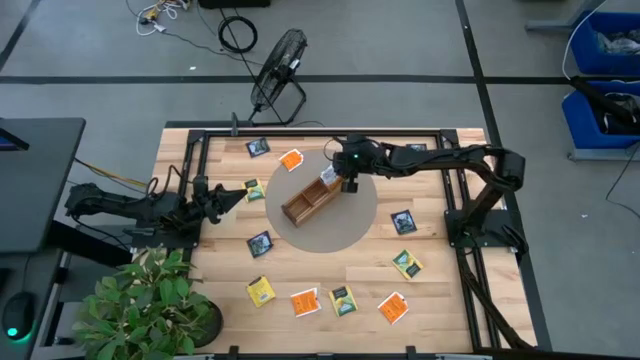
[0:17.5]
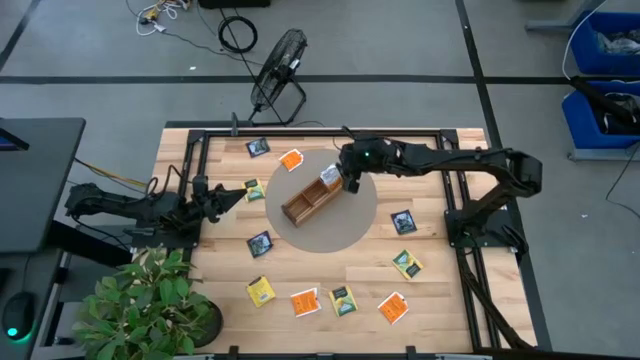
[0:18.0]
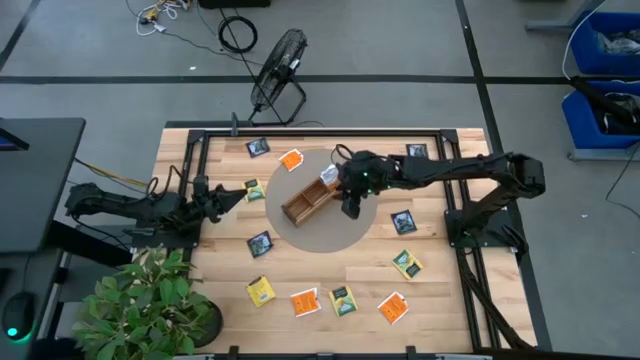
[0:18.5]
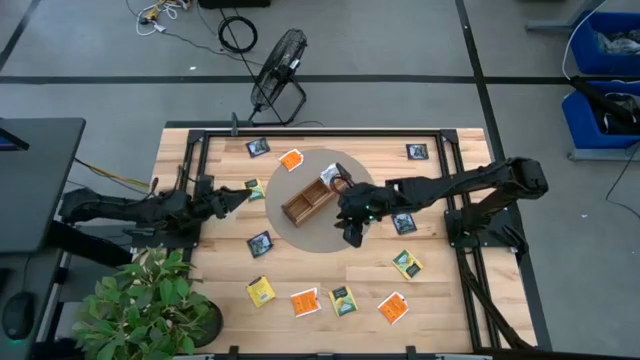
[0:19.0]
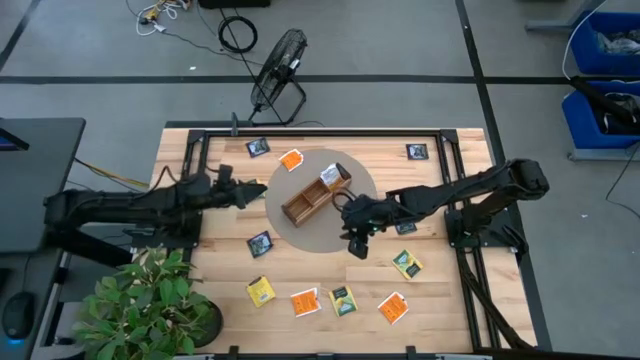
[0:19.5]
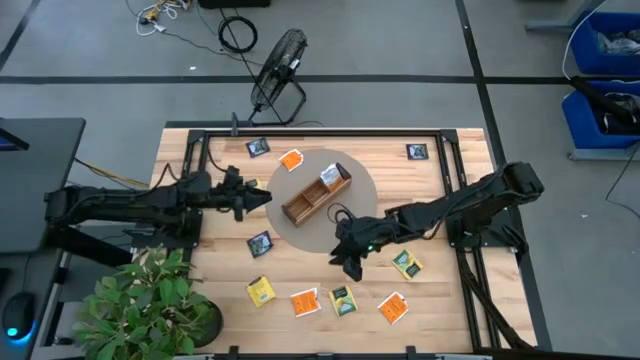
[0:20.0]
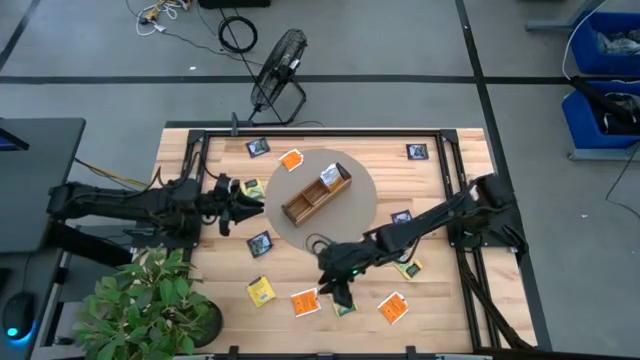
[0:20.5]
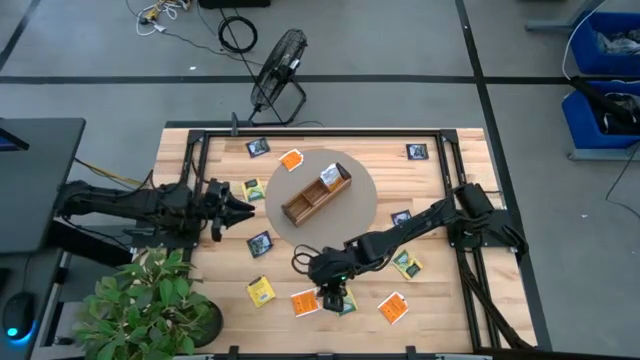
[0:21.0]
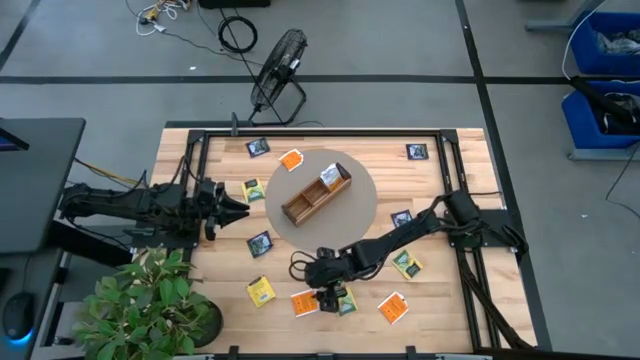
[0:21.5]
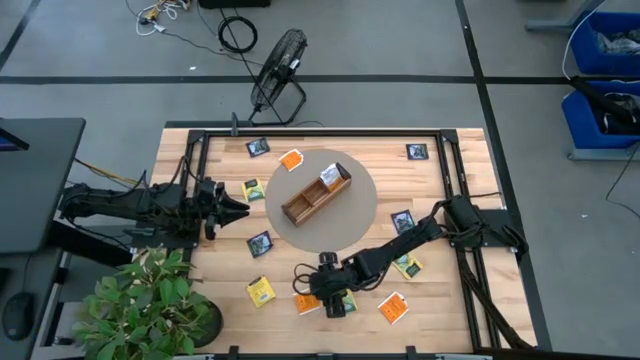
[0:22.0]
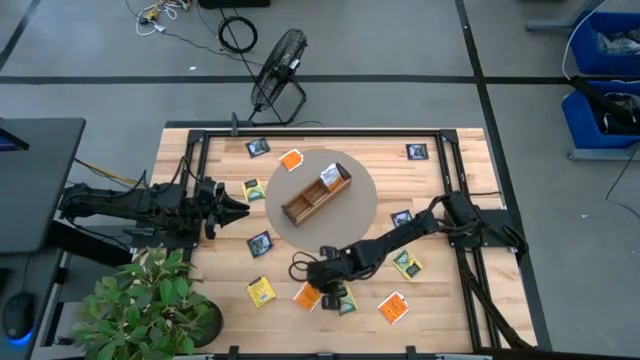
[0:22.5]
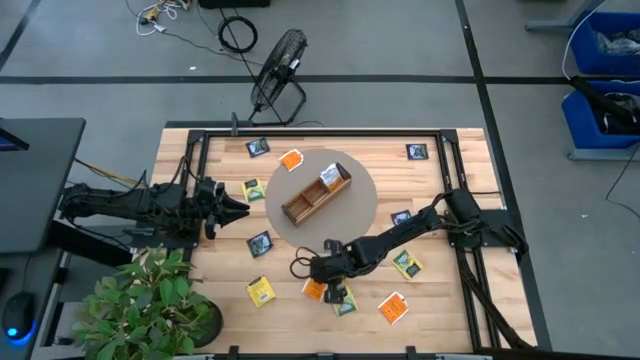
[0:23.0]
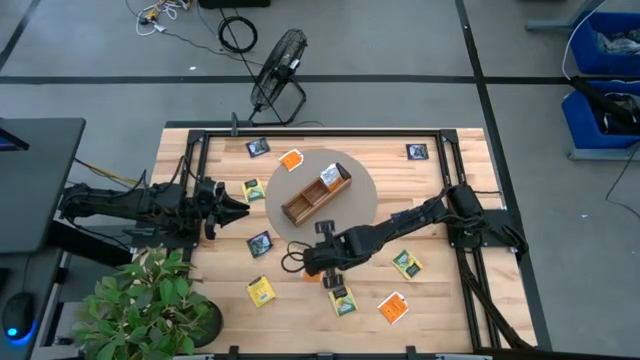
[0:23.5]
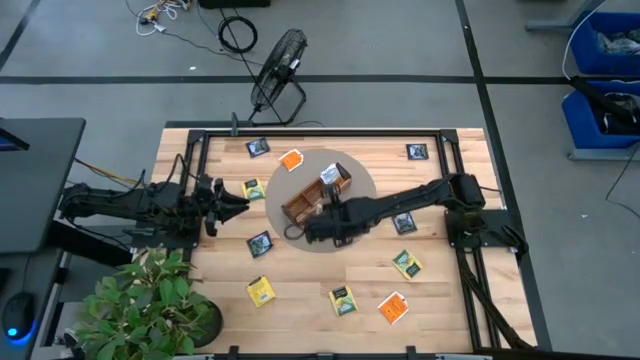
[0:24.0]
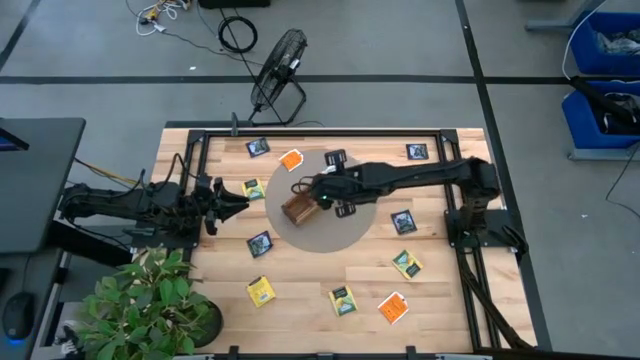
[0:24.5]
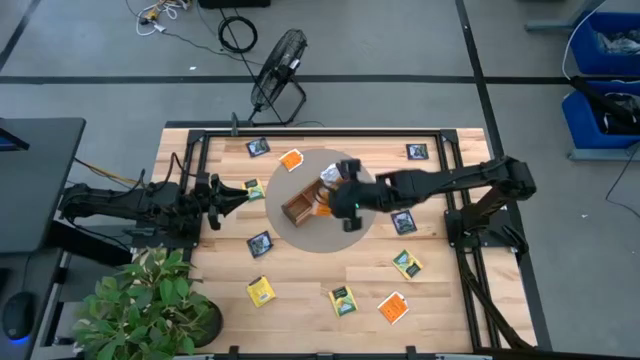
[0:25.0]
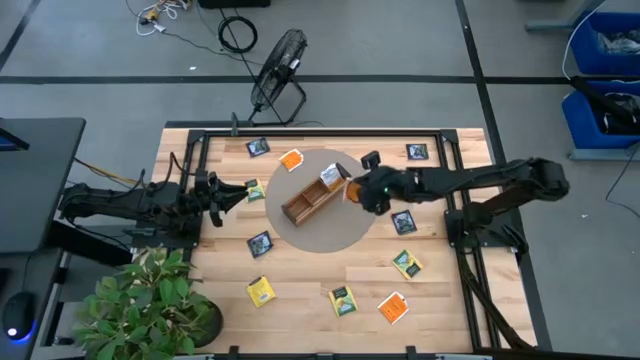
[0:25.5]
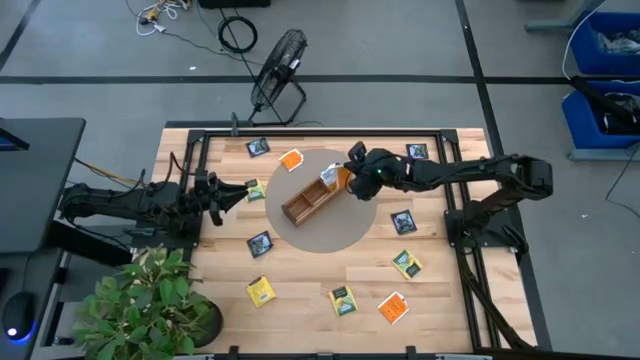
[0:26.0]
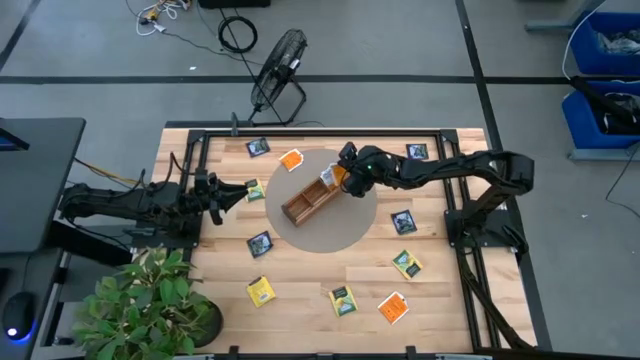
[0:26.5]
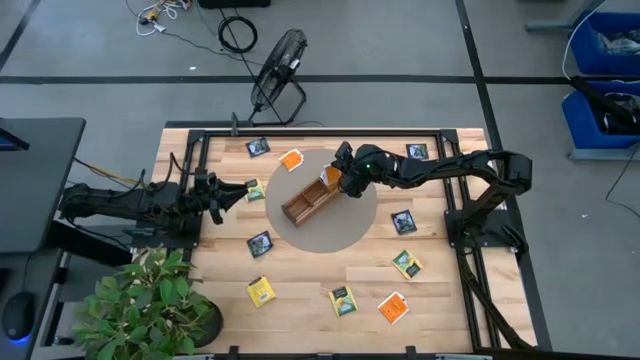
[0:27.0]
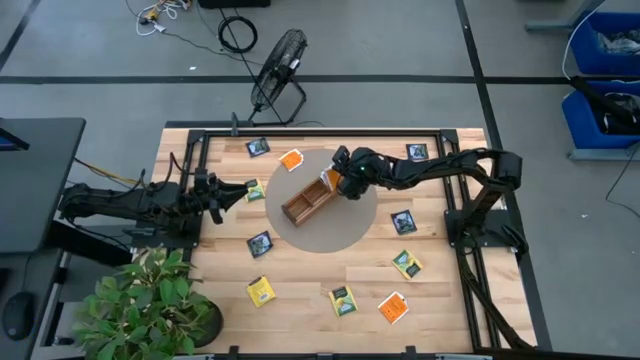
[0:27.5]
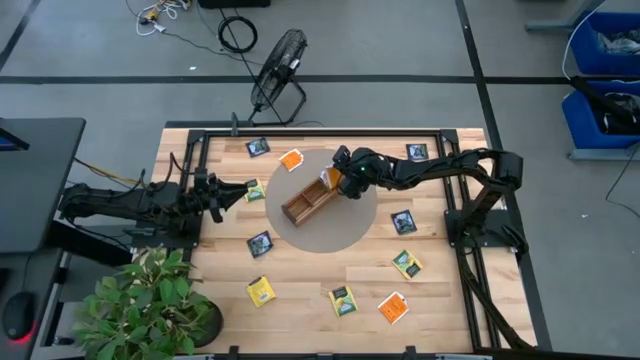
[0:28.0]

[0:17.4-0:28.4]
Task: Pick & Place Tea
Put the orange tea bag into the right section of the wooden organizer

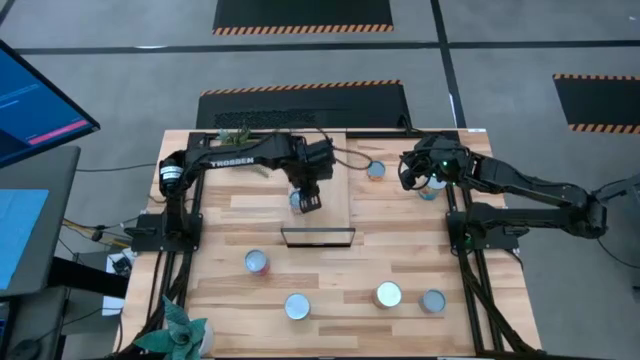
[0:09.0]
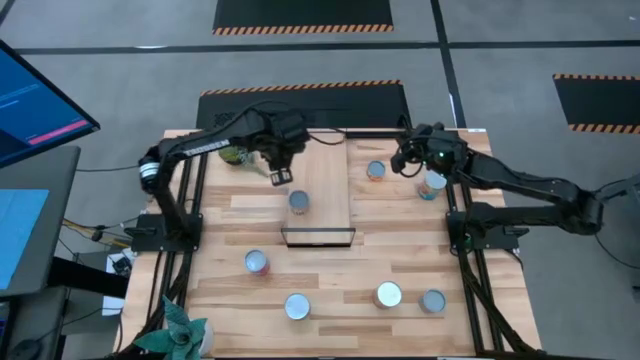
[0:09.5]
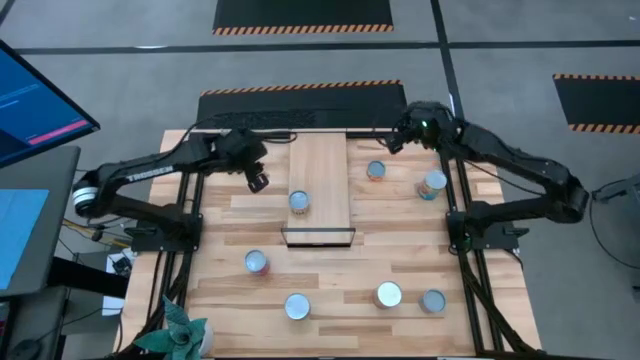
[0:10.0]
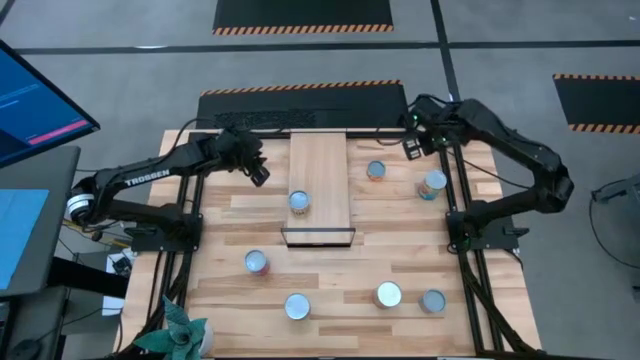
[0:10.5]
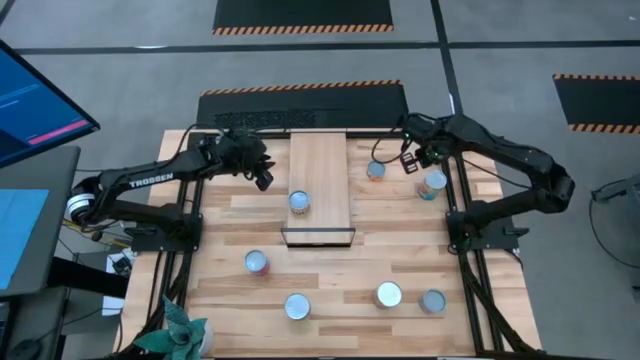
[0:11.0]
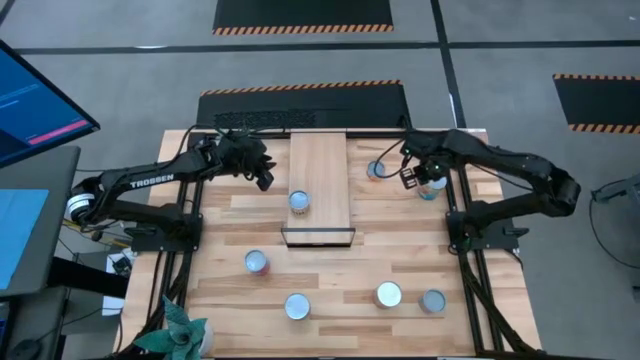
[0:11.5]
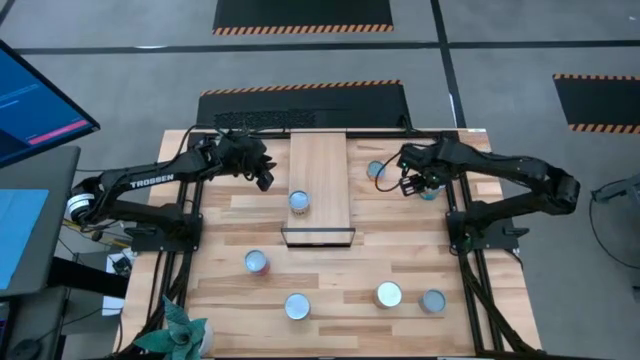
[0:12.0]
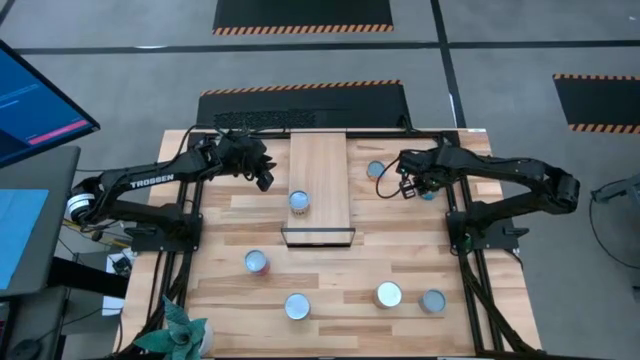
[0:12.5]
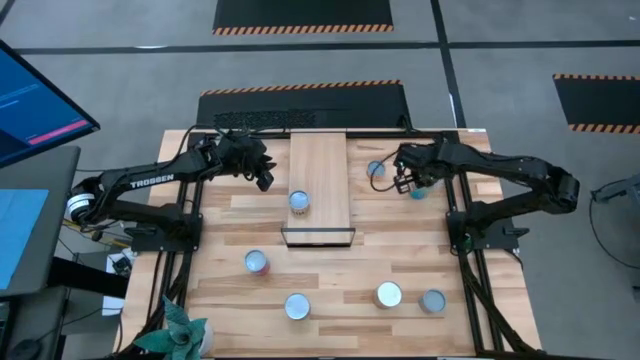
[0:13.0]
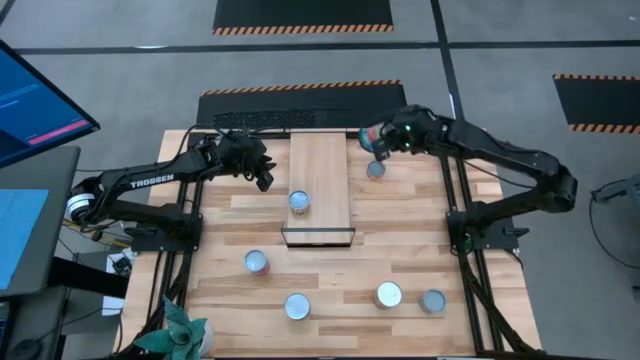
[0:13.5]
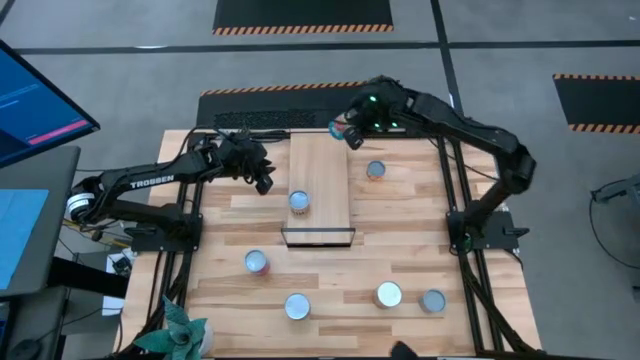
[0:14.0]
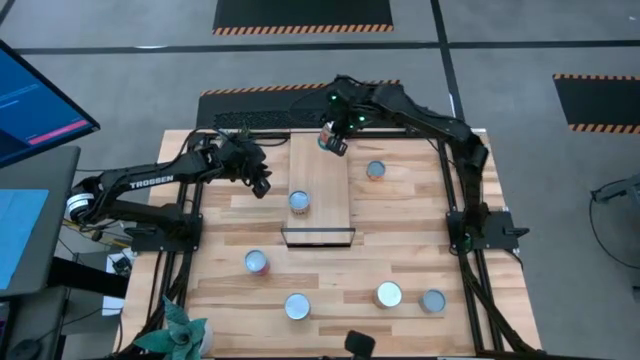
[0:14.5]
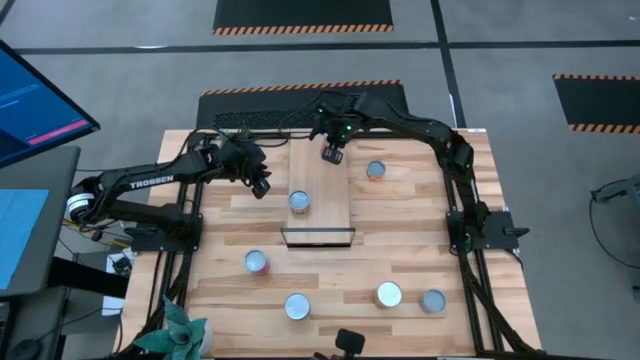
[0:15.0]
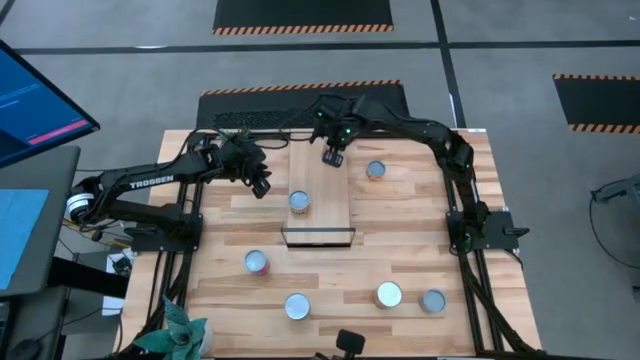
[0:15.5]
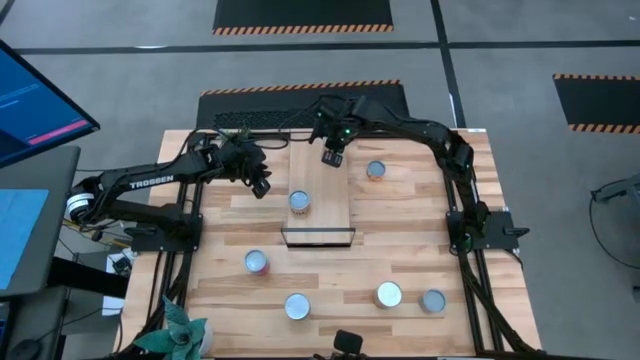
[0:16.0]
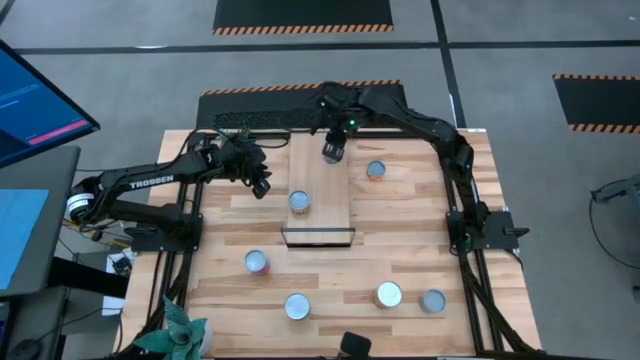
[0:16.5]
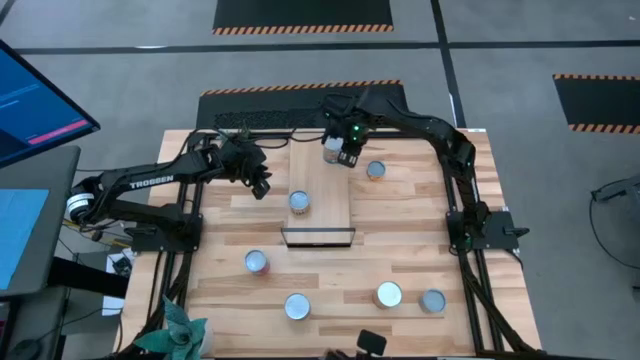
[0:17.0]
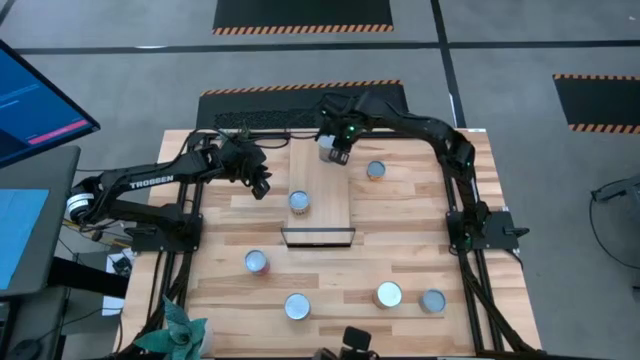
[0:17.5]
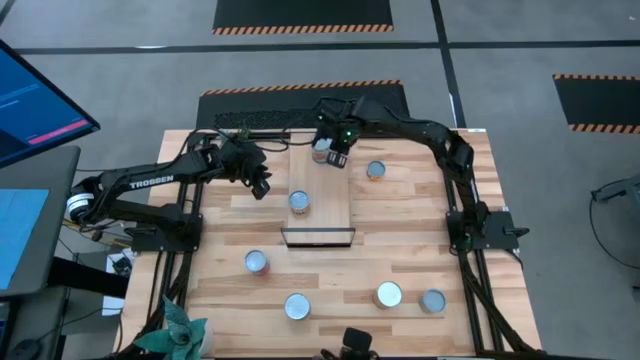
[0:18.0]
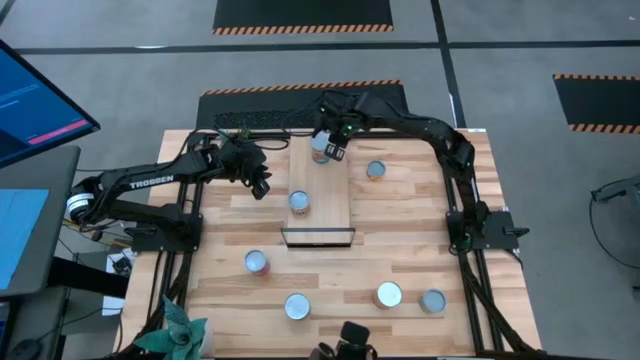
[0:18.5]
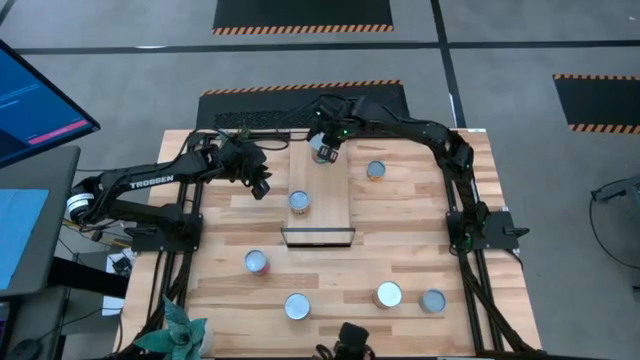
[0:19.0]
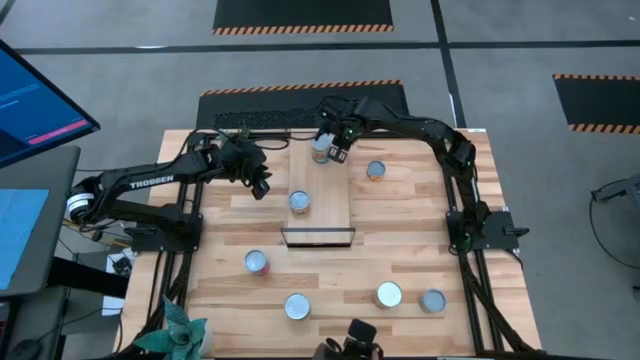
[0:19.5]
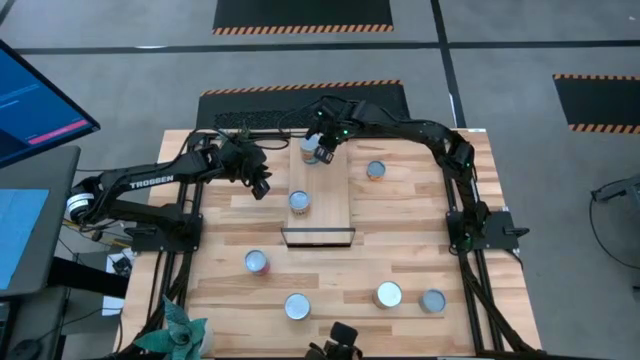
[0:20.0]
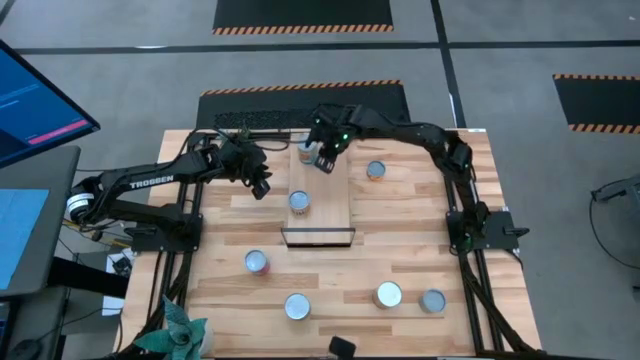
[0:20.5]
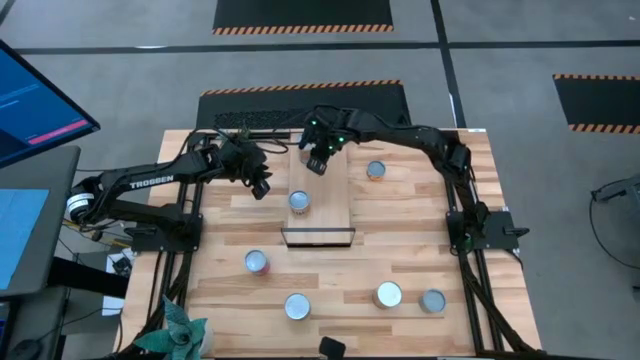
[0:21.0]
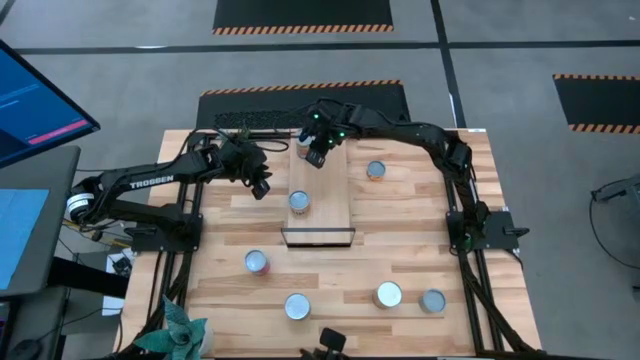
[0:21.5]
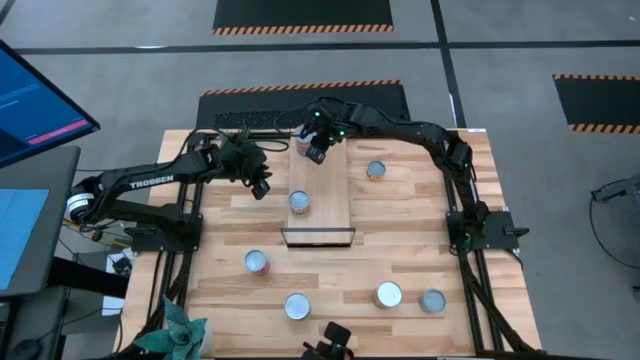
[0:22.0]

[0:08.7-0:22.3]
Task: Pick and place cans onto a shelf
Put the canned tomatoes on the shelf
